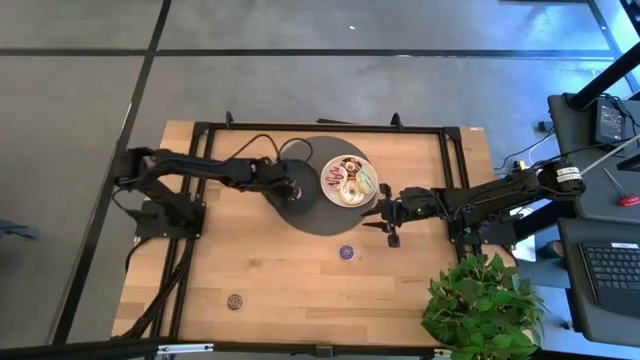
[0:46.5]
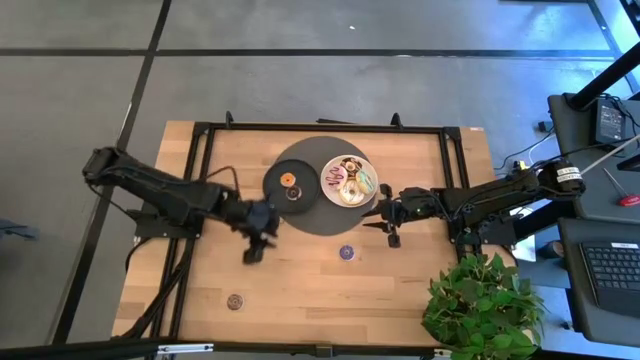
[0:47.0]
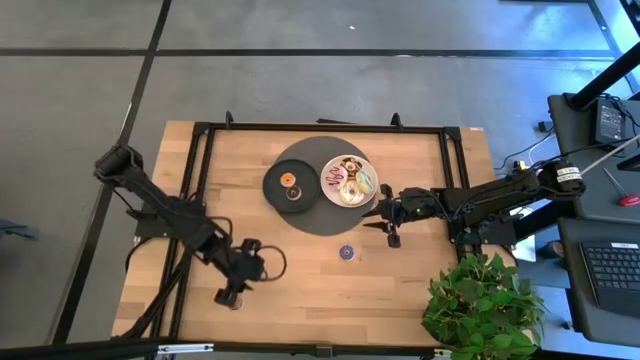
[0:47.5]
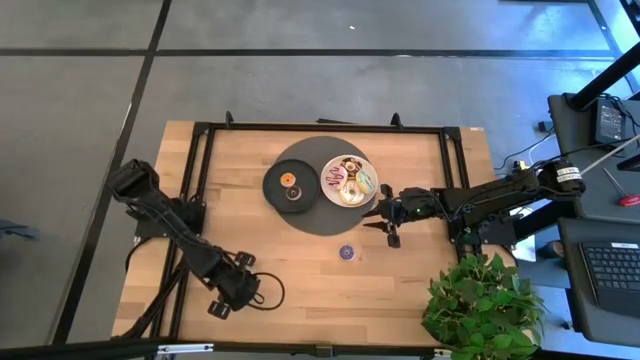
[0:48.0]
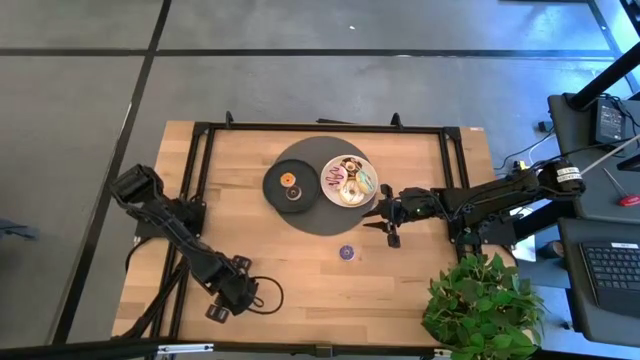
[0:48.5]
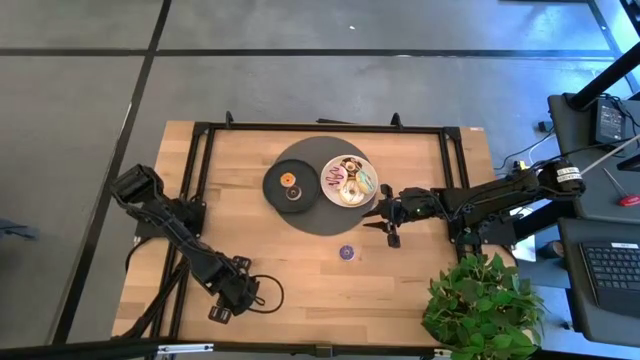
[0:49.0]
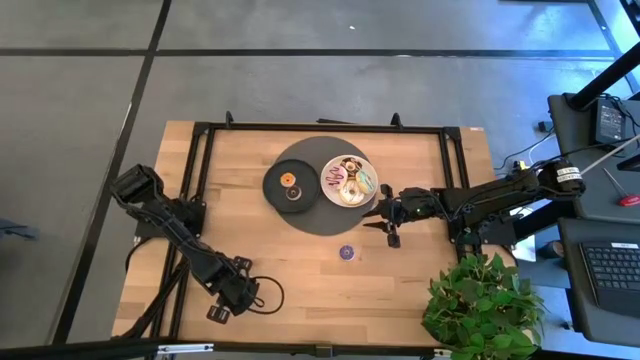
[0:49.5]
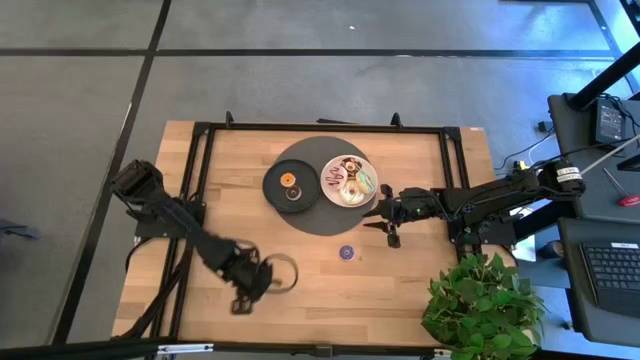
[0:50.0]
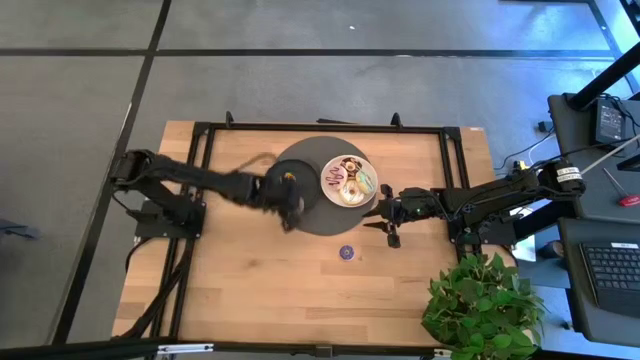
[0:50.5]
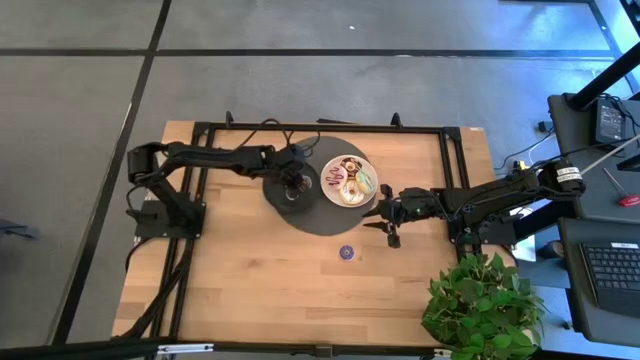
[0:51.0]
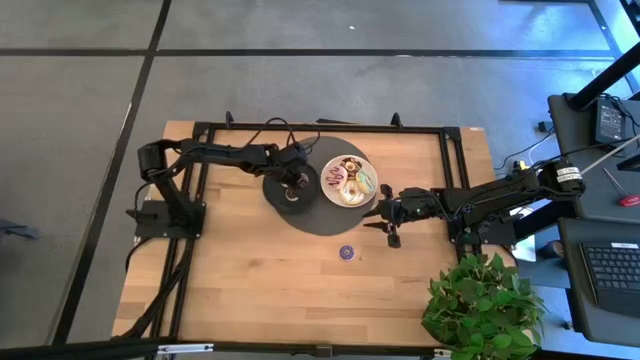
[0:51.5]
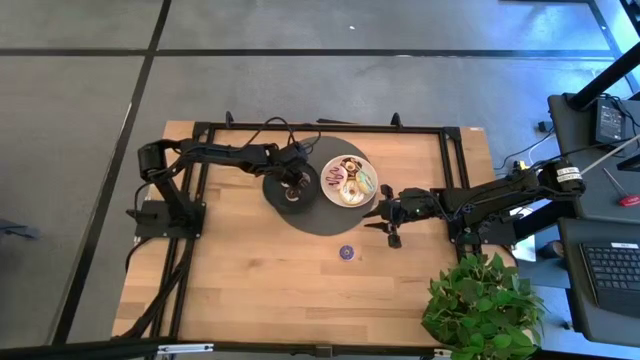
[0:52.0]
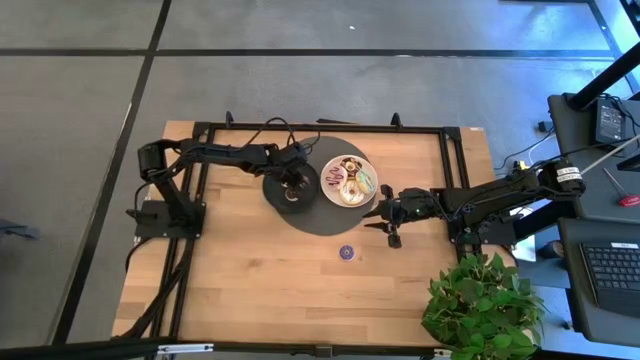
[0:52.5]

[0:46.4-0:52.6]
Task: Pick & Place donuts
Put the small brown donut on the black plate

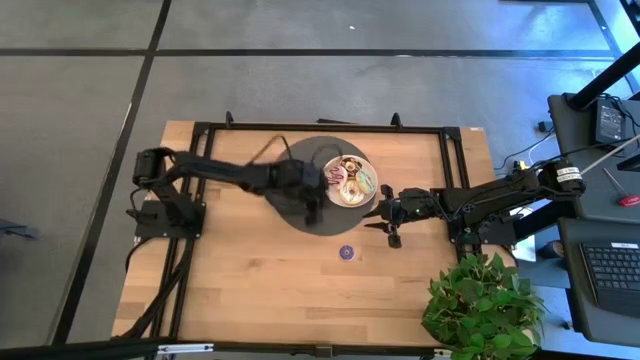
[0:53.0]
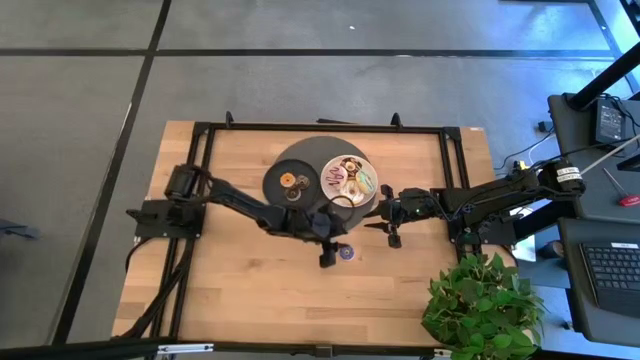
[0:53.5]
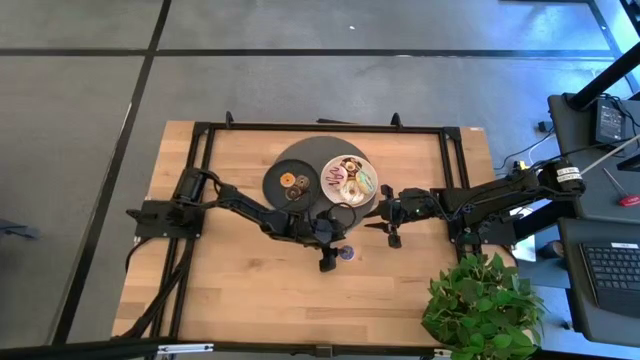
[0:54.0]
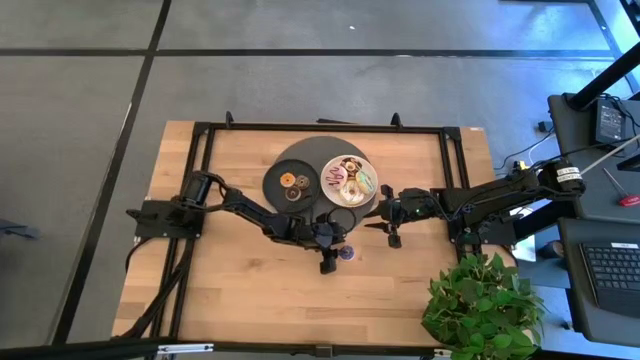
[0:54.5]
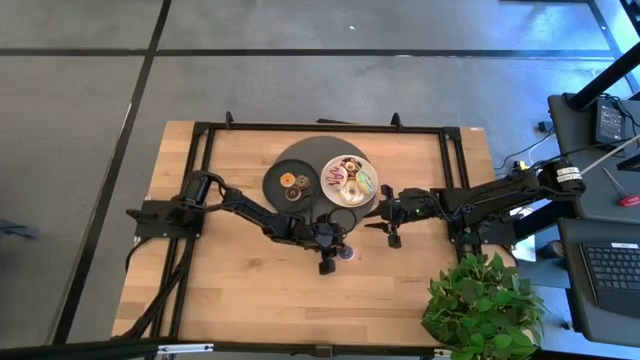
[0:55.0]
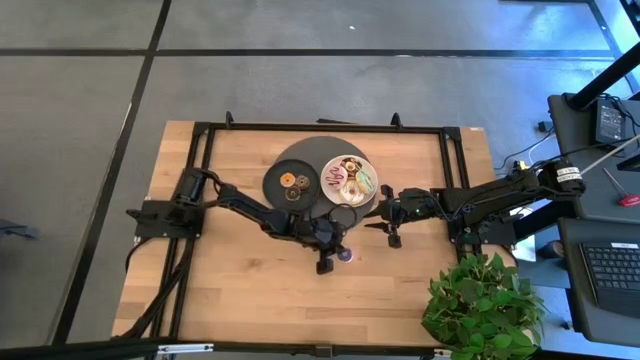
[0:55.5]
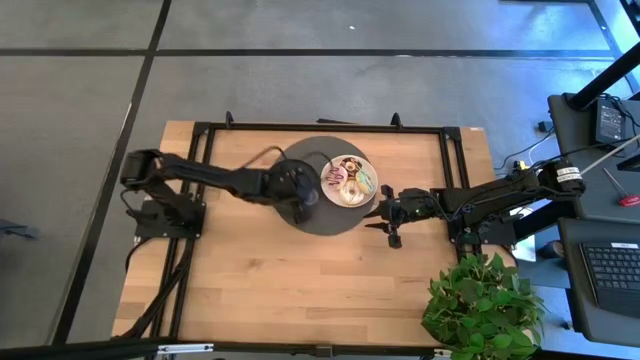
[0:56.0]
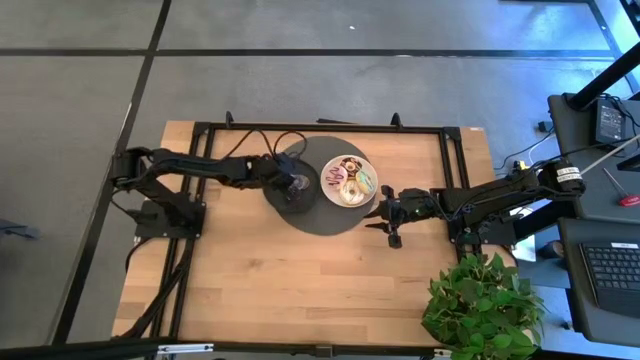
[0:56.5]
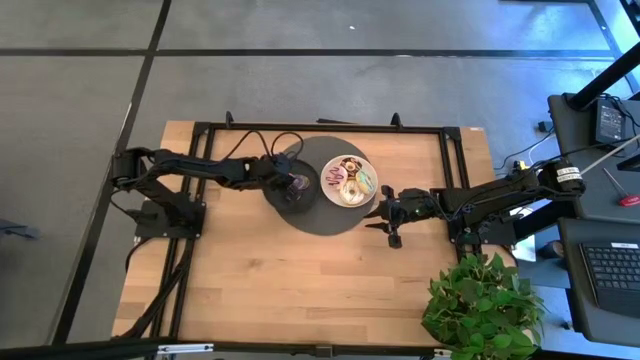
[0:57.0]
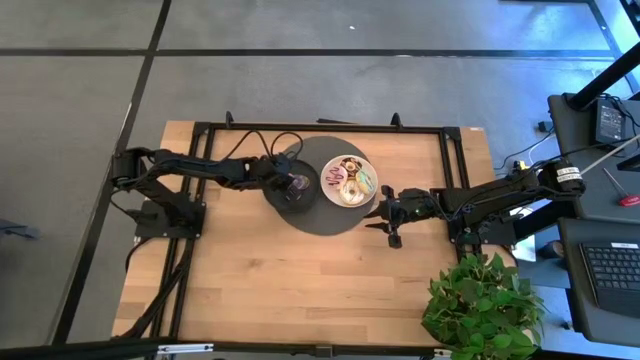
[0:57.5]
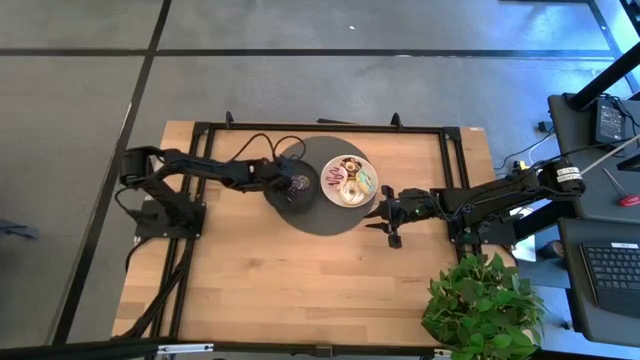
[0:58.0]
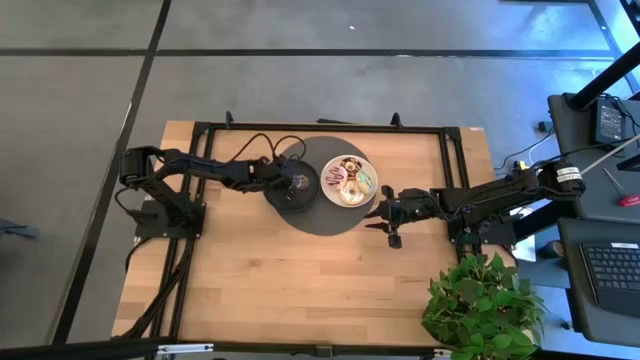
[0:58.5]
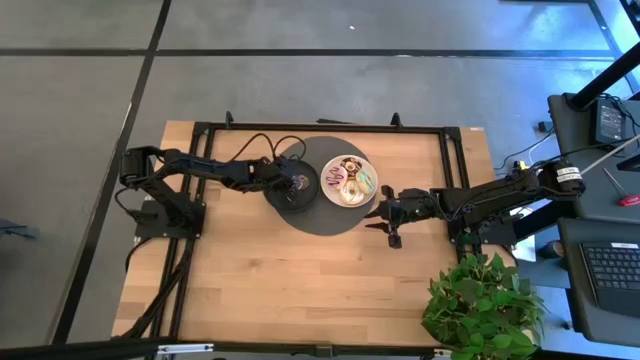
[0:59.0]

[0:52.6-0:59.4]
Put the small blue donut on the black plate

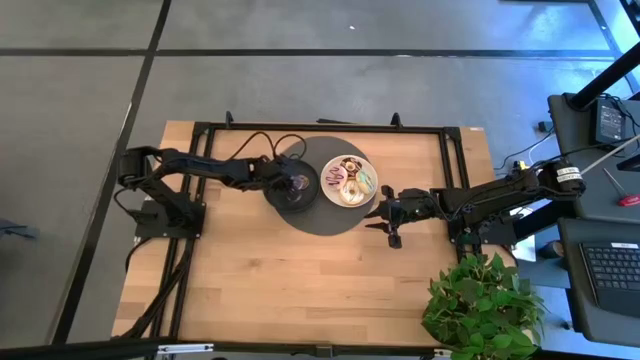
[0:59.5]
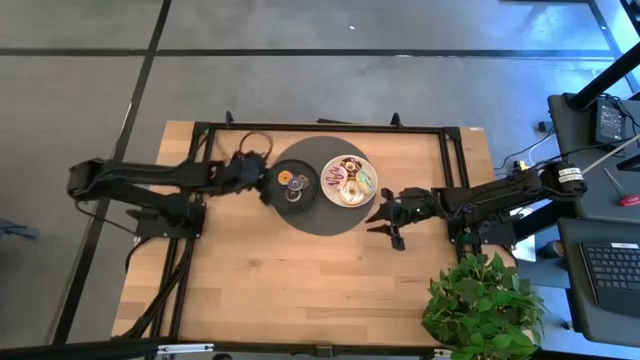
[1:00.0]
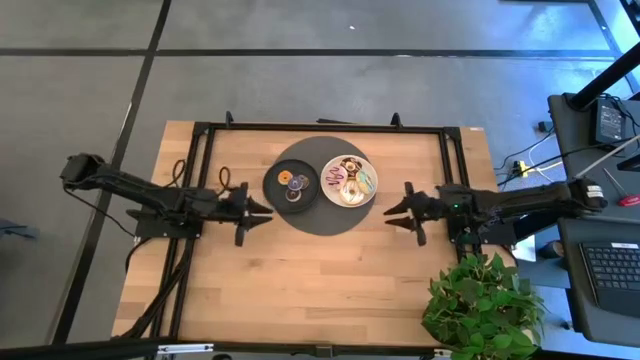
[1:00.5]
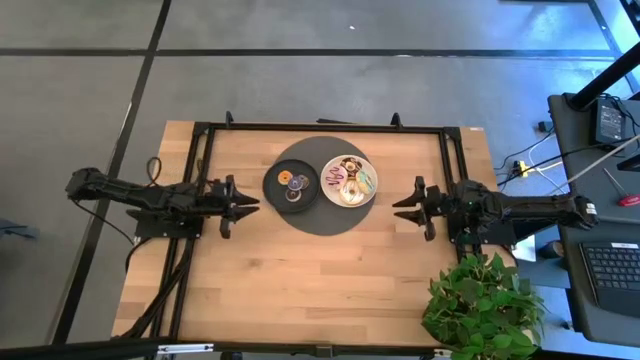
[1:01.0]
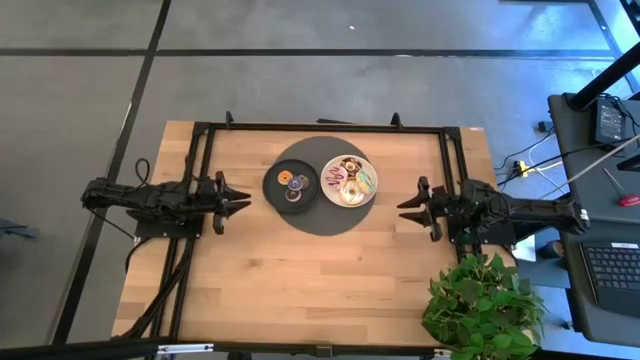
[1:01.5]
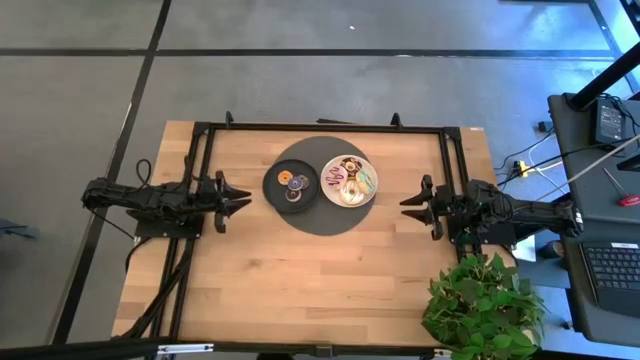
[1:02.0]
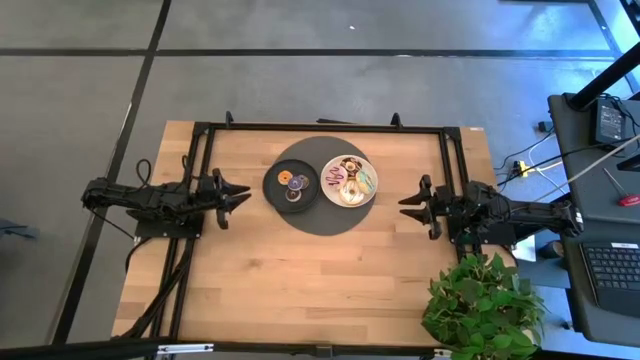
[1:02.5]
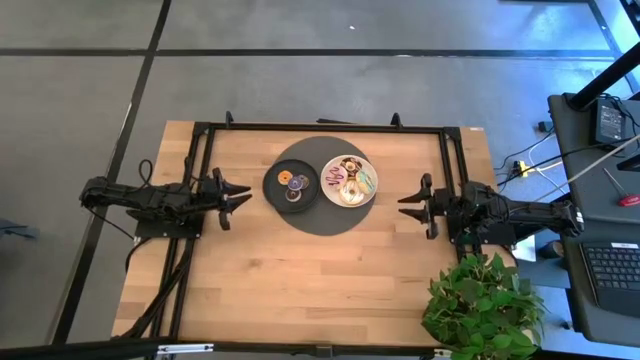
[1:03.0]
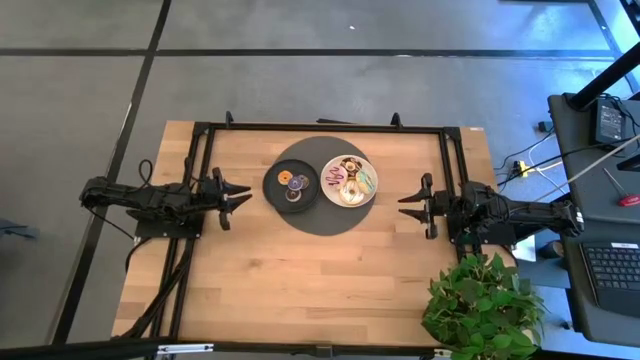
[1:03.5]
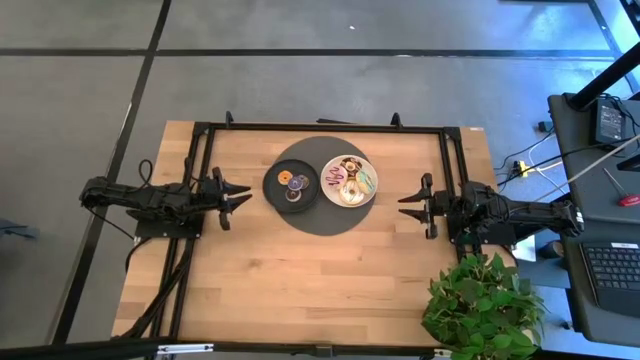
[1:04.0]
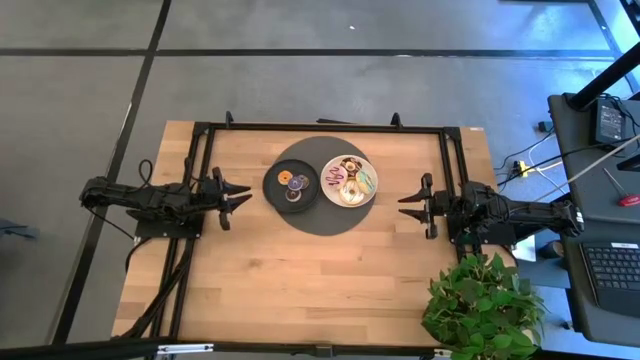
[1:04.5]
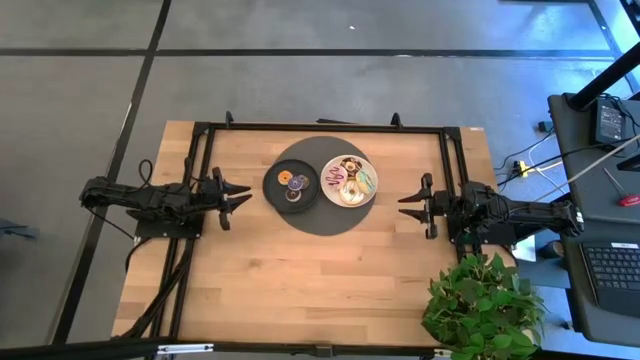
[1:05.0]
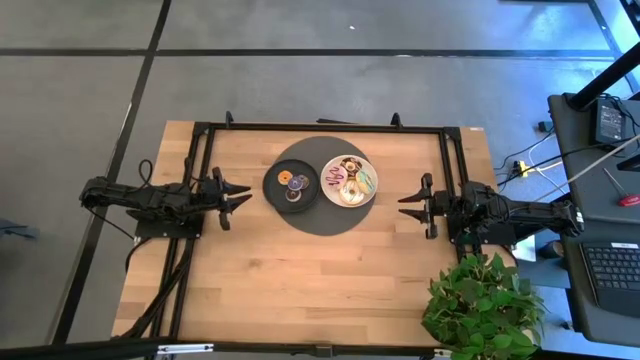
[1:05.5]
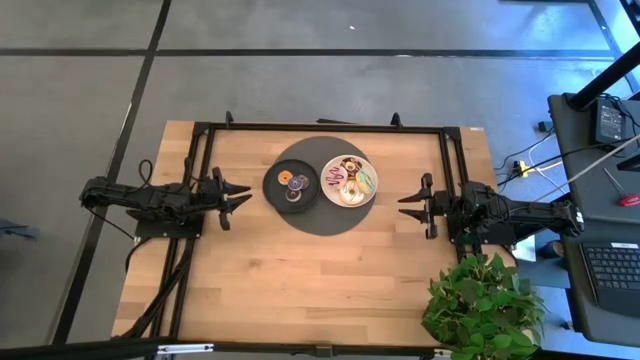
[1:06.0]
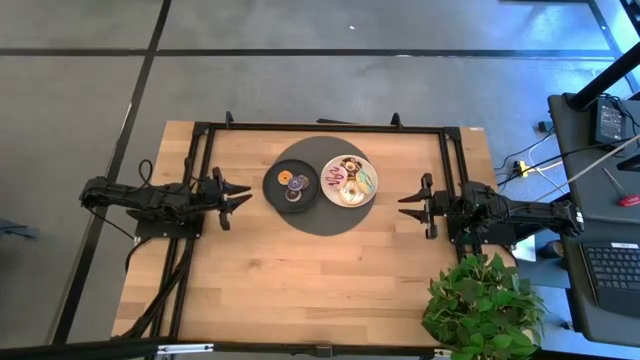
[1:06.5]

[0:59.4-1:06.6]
Return to Home Position

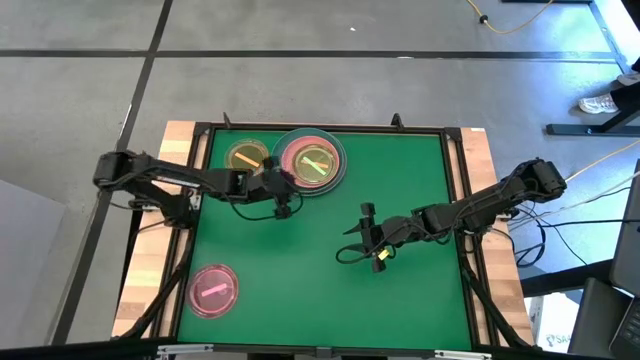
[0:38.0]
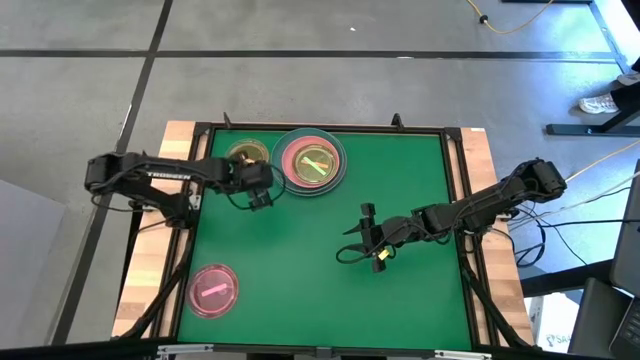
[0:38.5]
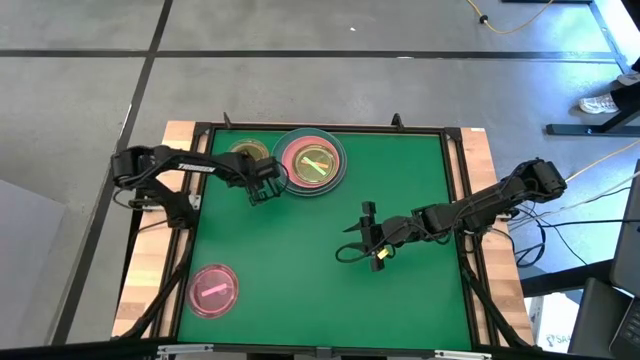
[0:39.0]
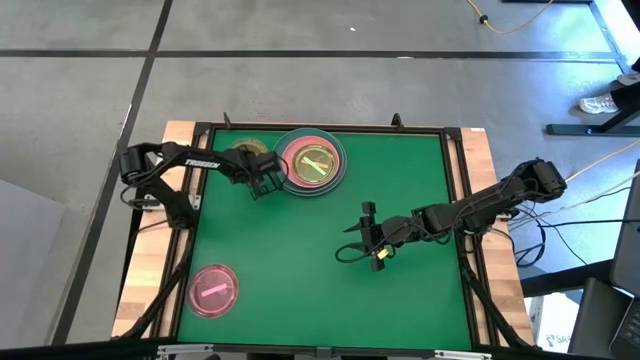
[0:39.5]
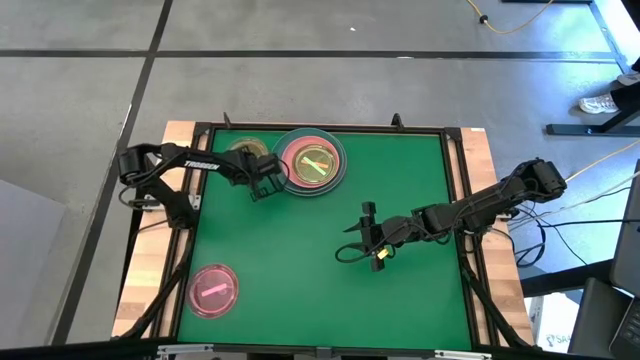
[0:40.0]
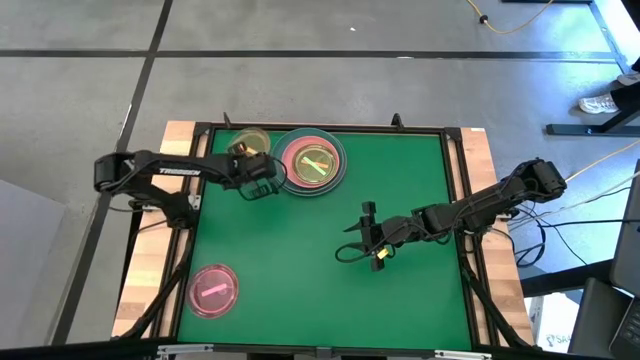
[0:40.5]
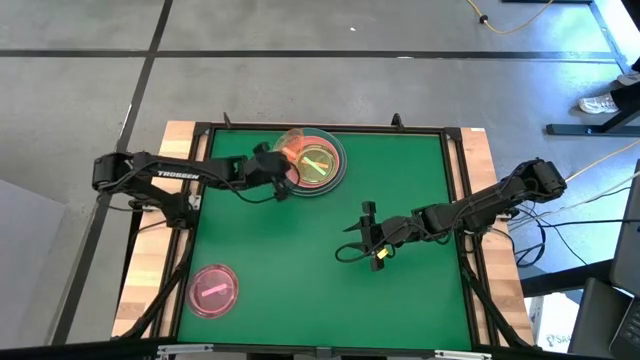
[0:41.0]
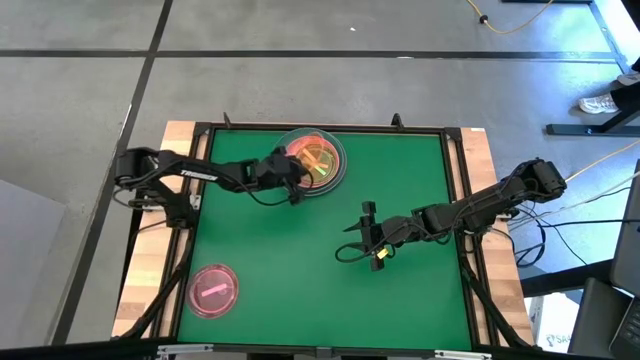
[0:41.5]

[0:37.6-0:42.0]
Task: Stack plastic plates
Stack the orange plate on top of the light green plate
